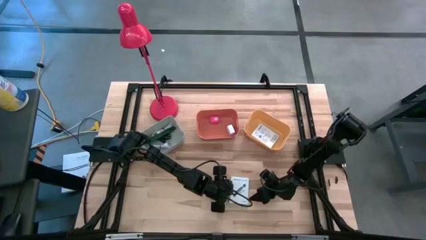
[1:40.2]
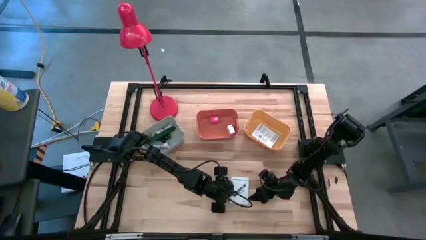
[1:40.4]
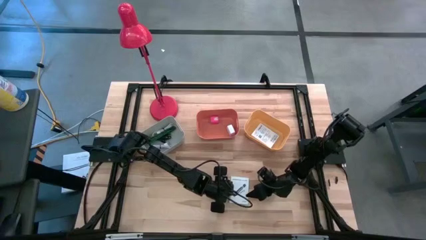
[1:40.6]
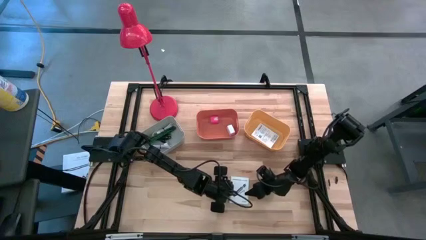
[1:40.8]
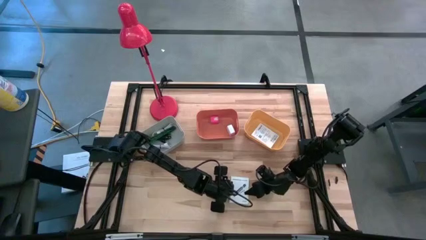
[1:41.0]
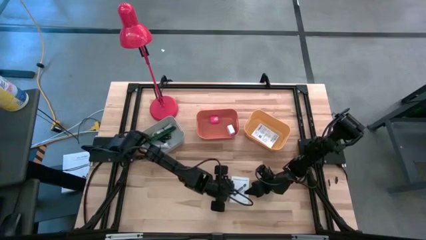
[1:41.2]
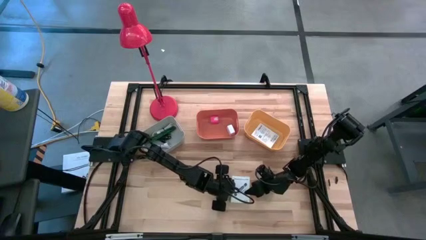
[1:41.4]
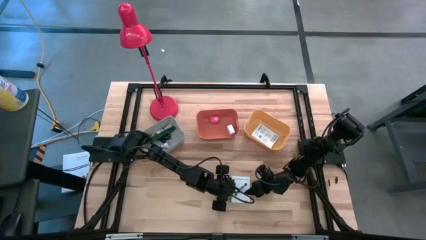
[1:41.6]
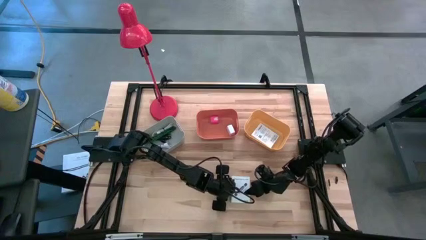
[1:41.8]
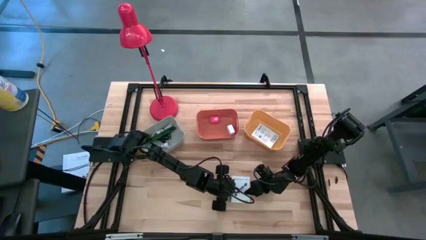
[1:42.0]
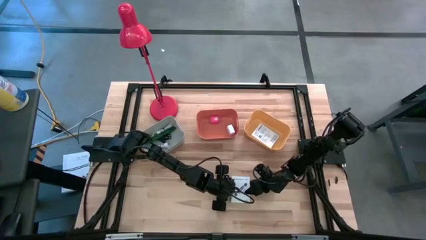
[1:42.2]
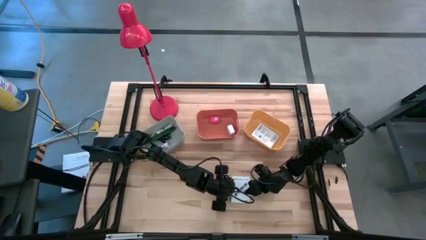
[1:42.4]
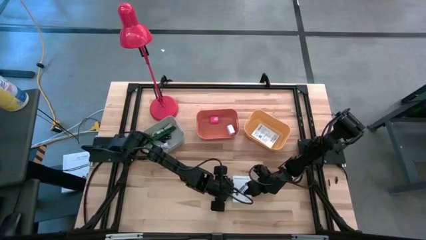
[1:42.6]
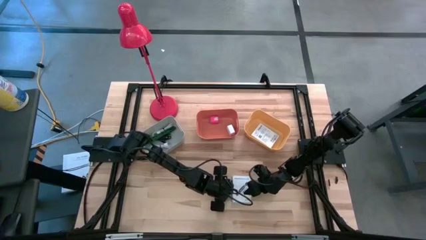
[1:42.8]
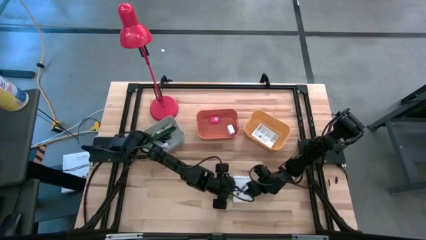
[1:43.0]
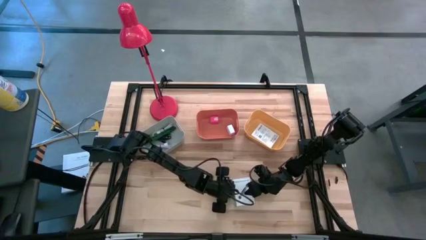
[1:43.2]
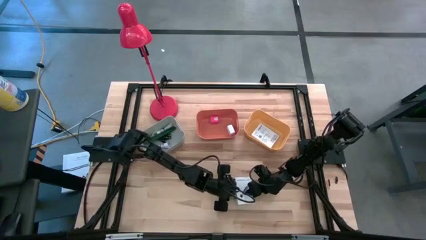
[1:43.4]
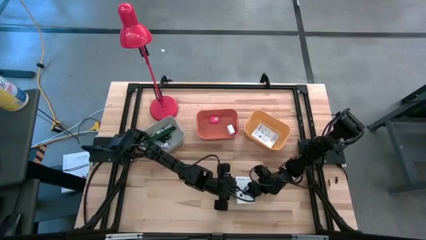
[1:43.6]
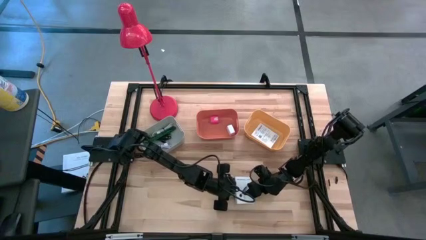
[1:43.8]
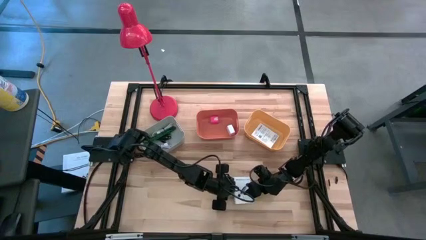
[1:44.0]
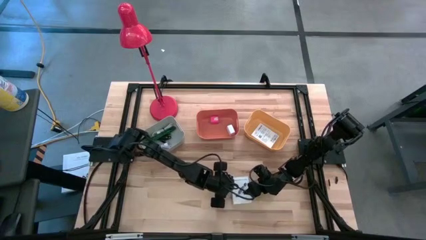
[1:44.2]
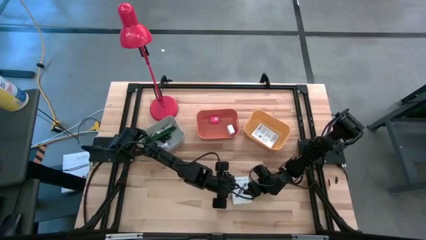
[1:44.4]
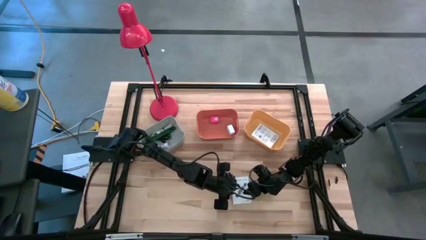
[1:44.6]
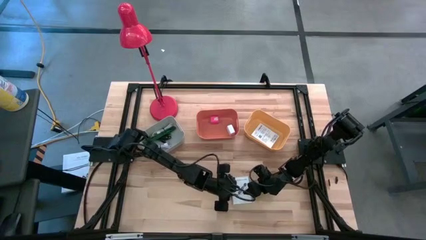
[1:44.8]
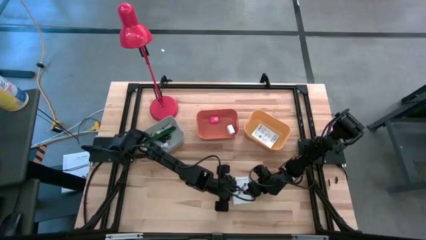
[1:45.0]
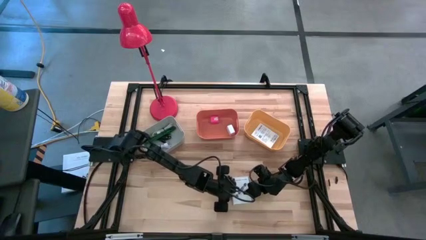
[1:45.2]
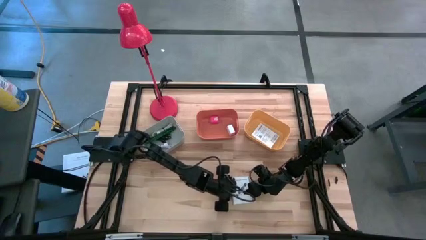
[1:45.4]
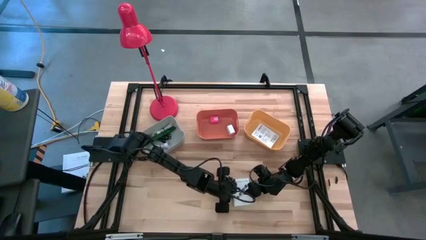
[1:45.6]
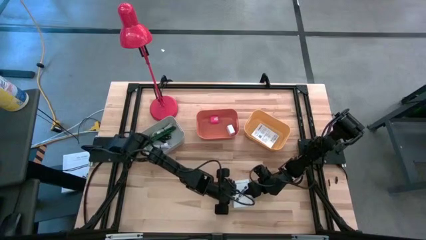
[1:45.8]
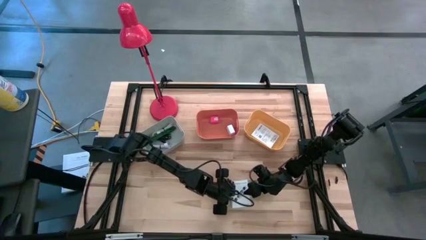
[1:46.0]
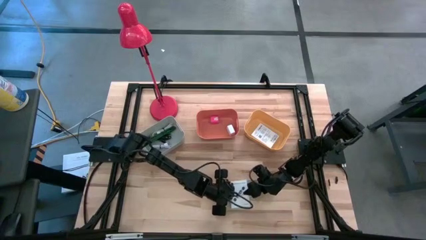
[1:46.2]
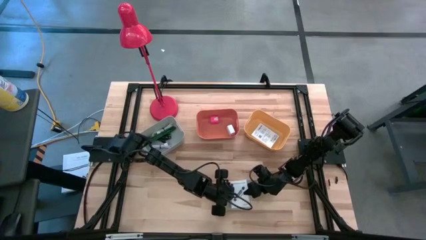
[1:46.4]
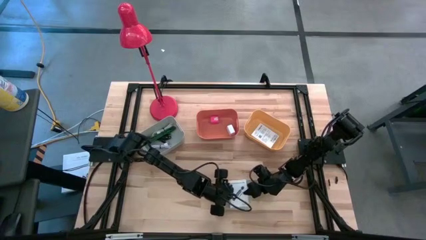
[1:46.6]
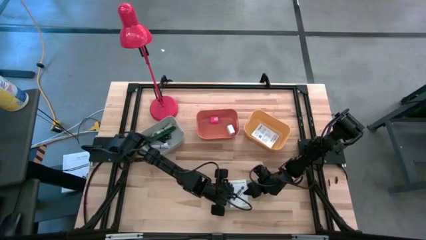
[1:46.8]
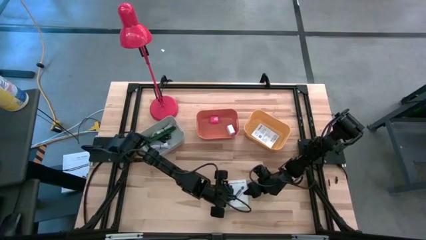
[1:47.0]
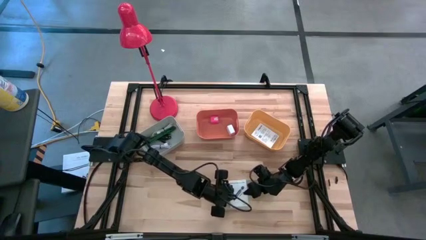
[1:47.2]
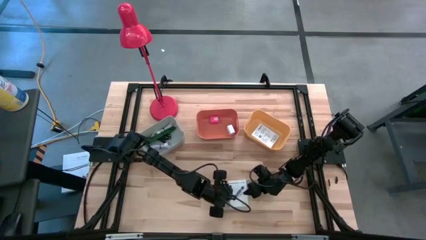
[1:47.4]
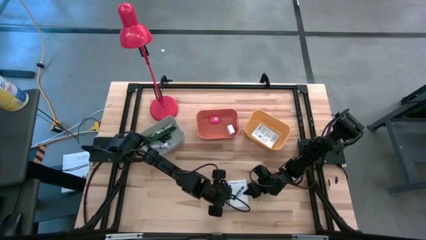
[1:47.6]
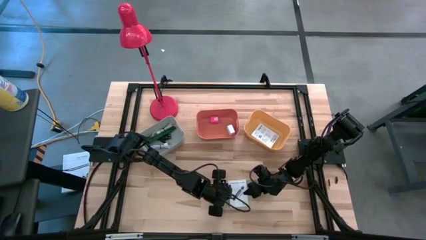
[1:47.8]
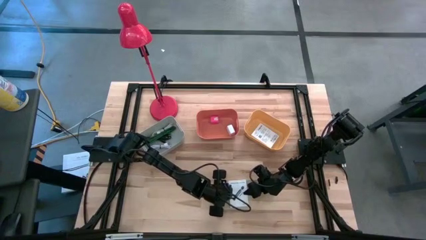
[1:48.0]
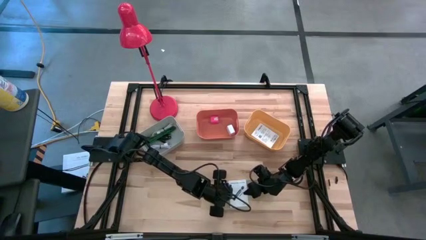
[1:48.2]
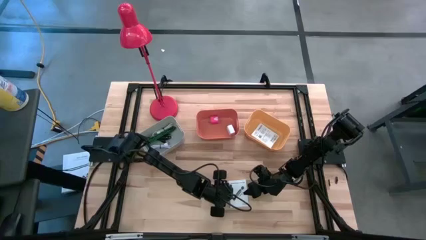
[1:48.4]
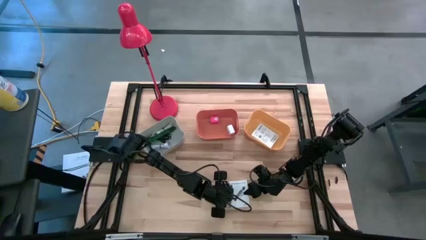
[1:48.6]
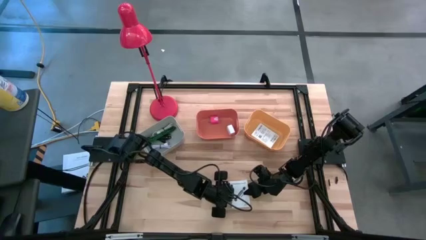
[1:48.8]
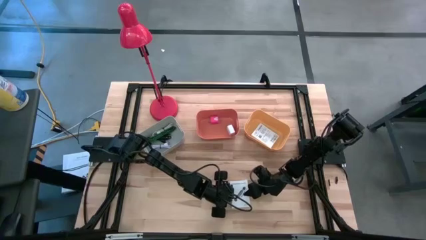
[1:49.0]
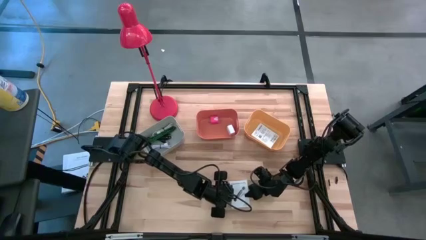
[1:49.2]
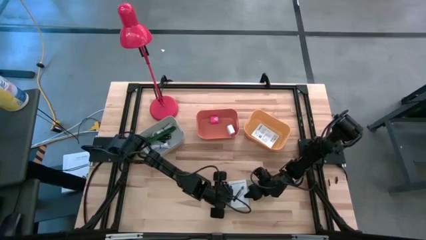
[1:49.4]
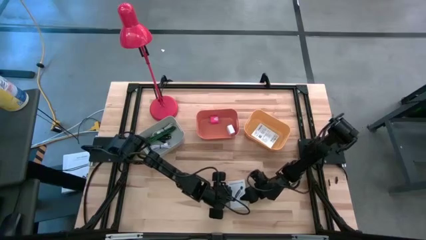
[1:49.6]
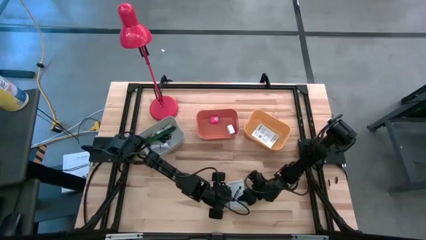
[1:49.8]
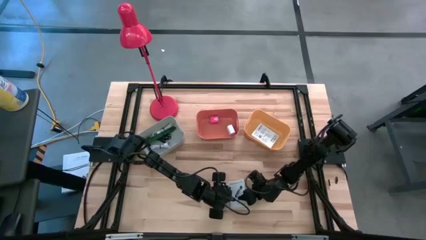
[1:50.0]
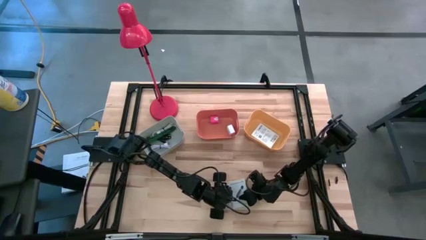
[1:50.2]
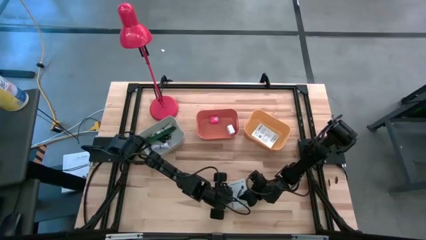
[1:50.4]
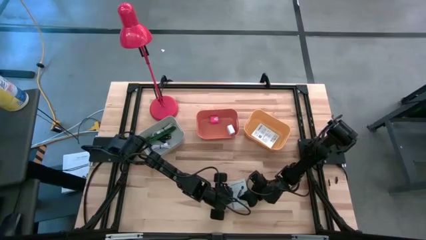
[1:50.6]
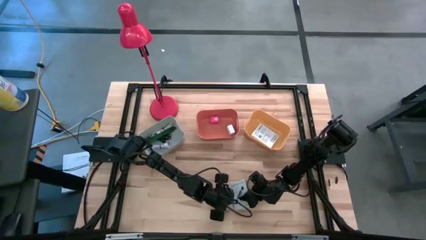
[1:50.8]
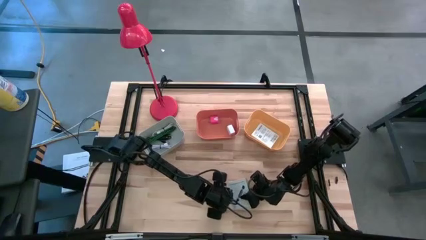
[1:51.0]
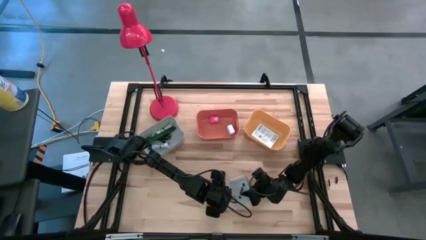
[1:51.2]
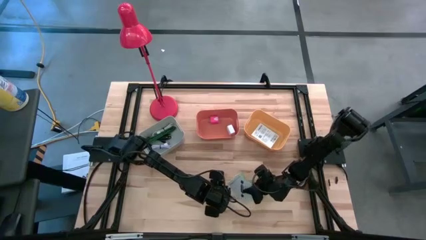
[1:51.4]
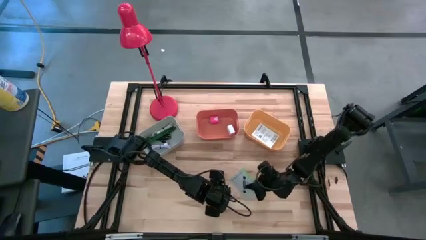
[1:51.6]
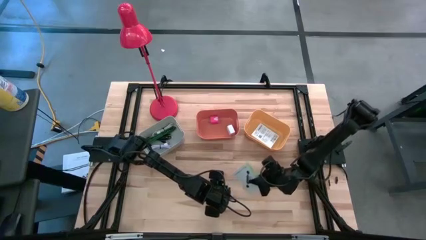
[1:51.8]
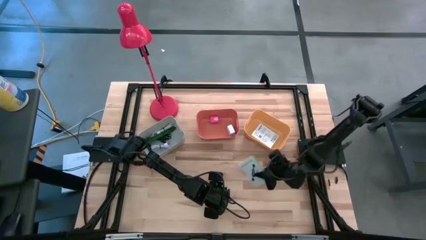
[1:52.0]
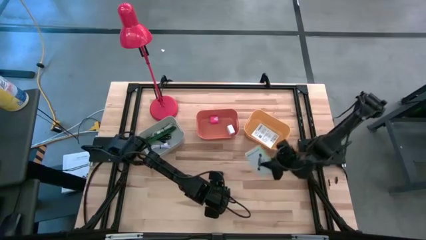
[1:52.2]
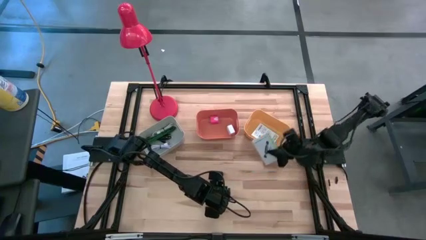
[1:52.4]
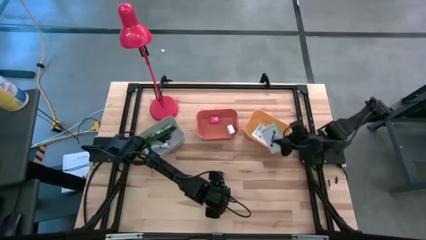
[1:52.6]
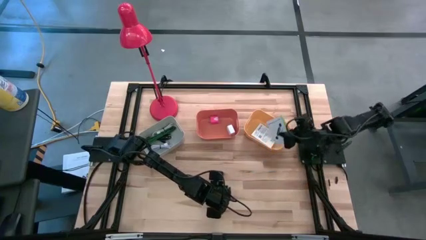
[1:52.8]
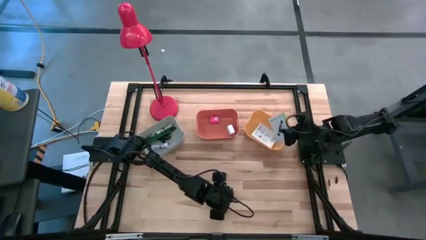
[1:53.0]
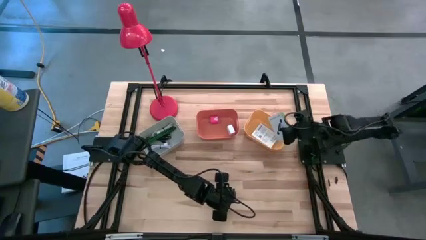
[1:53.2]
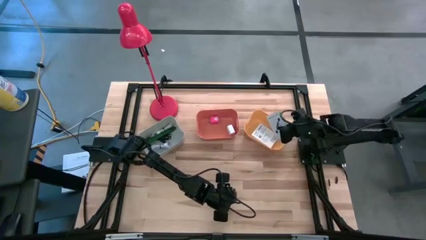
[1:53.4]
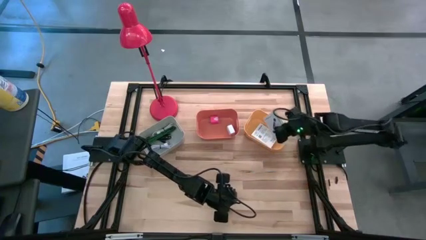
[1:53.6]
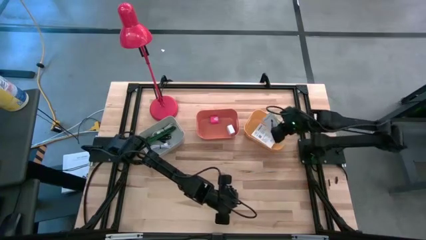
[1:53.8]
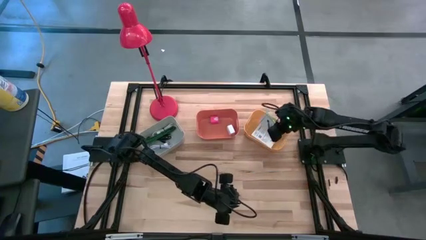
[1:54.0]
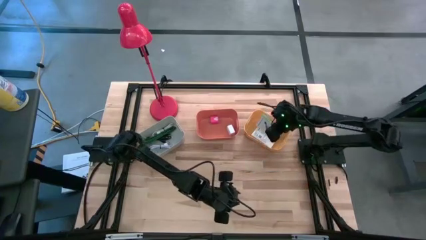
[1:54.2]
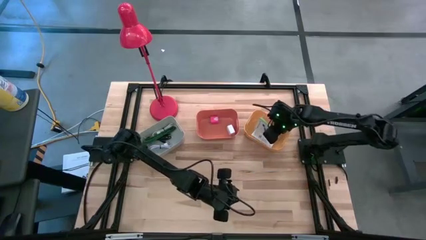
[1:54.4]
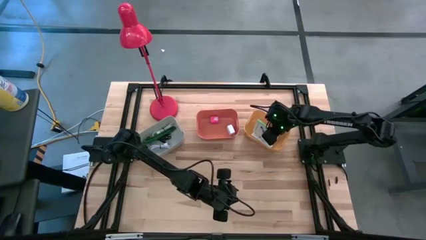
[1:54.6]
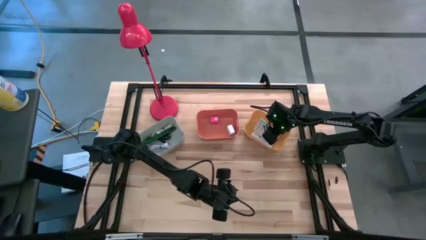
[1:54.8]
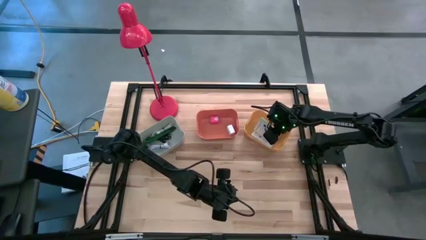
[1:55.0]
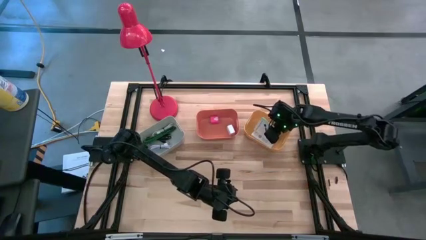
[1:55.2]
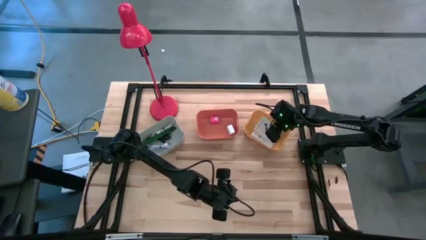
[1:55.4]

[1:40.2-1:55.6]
Task: Pick and place items into bin
Put the white box on top of the other white box in the yellow bin
